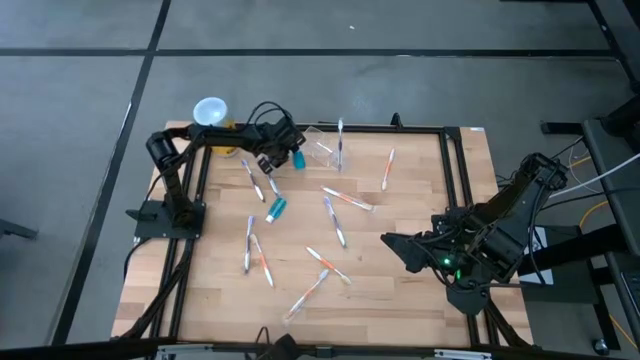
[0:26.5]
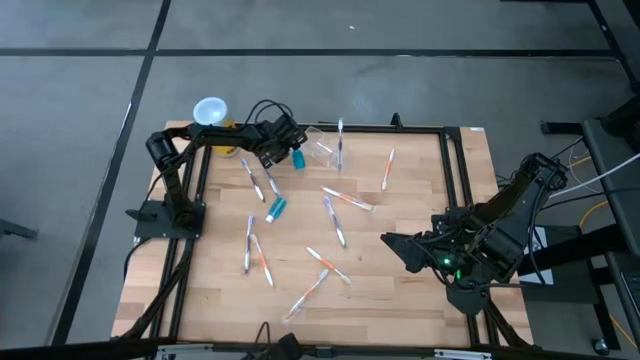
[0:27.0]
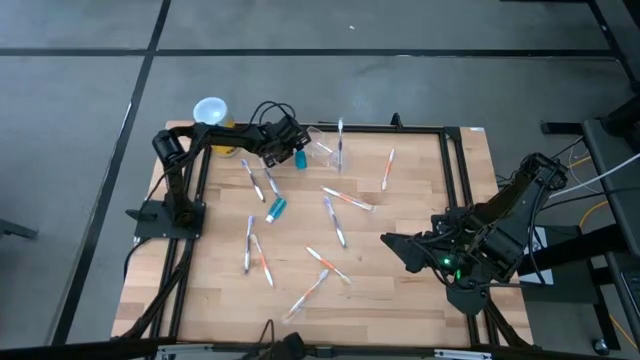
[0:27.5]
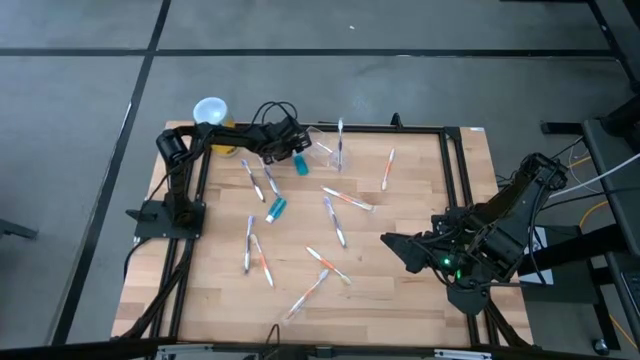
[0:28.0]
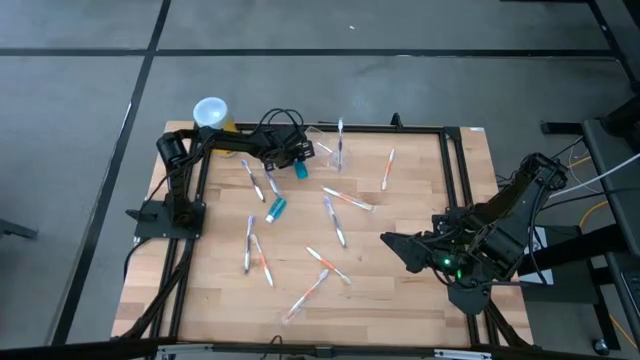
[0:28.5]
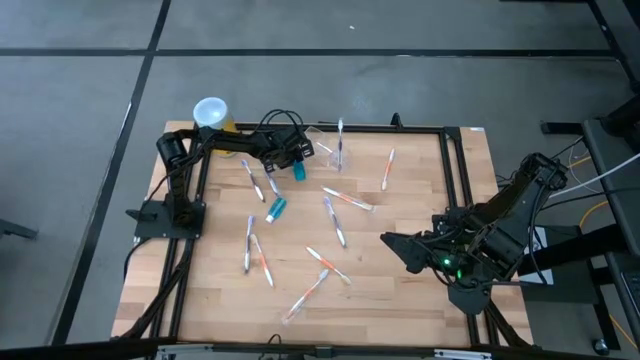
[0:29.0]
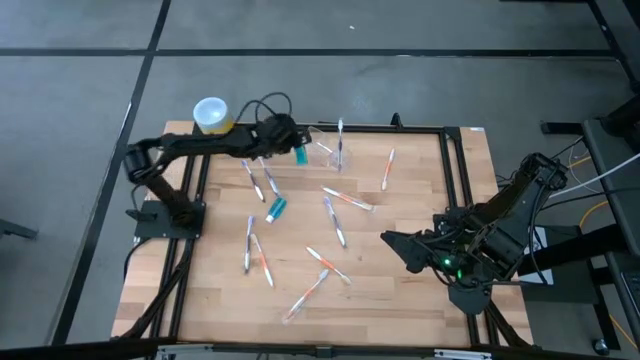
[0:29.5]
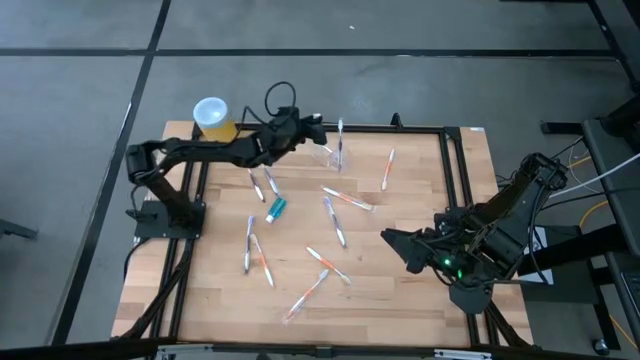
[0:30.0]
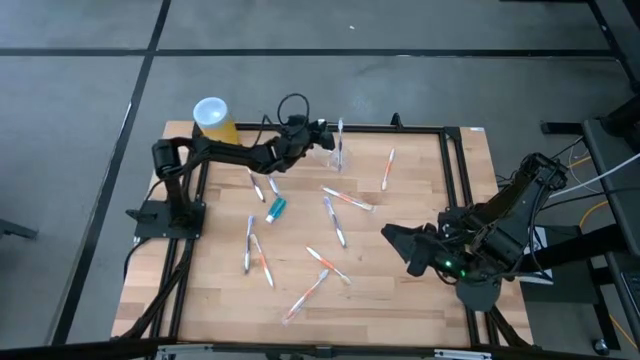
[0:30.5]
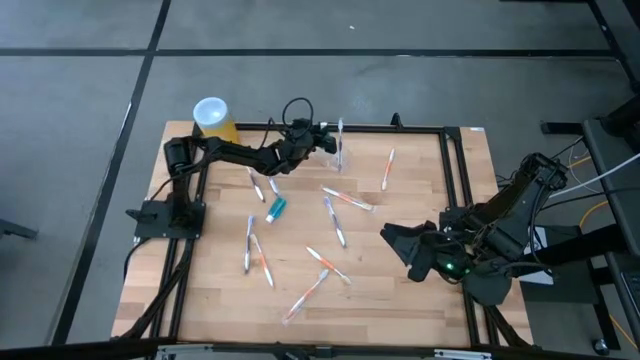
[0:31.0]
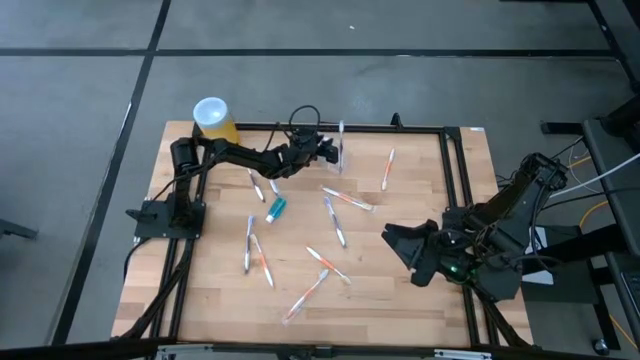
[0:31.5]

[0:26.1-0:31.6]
Task: Pick & Place toothbrushing station
Put the blue mouthwash into the middle section of the transparent organizer

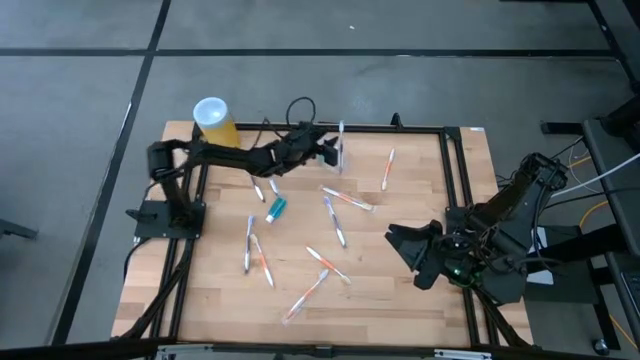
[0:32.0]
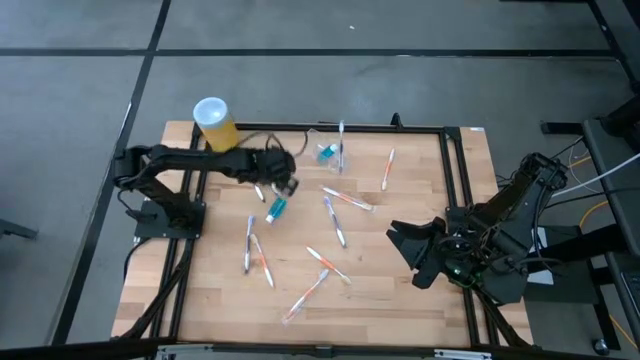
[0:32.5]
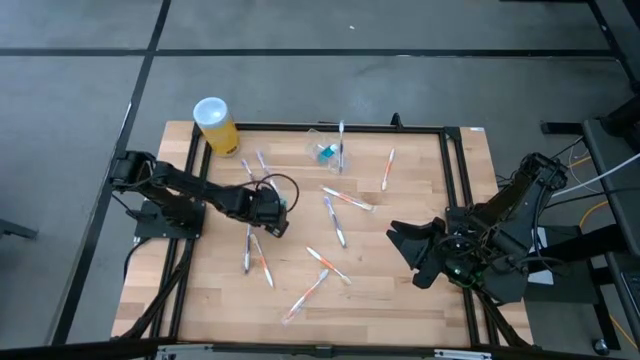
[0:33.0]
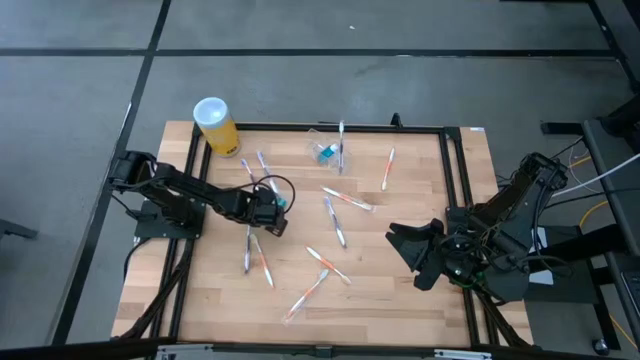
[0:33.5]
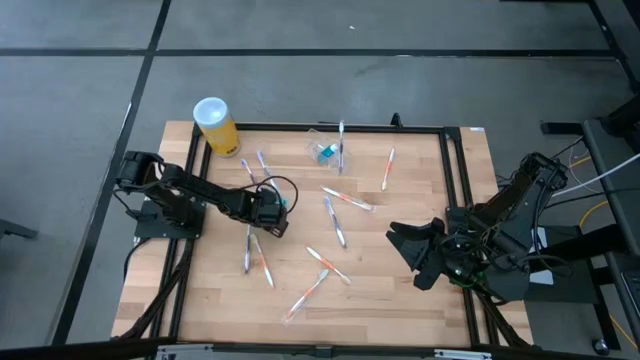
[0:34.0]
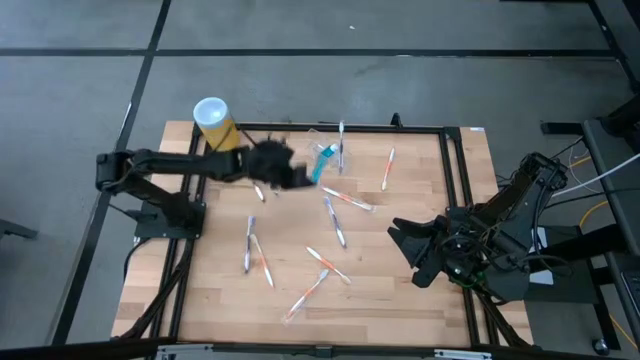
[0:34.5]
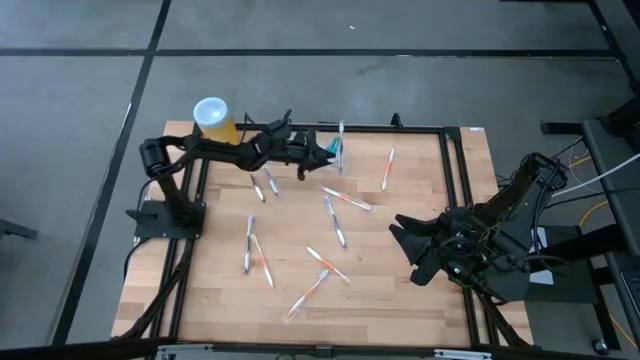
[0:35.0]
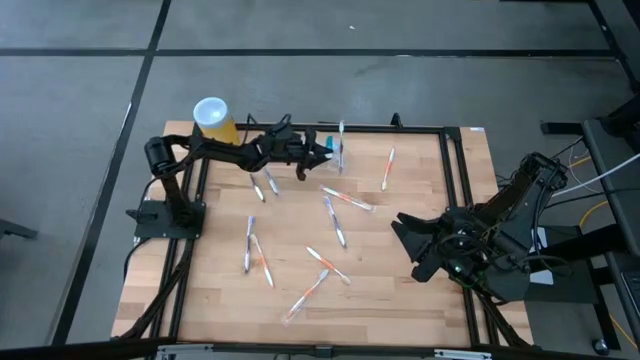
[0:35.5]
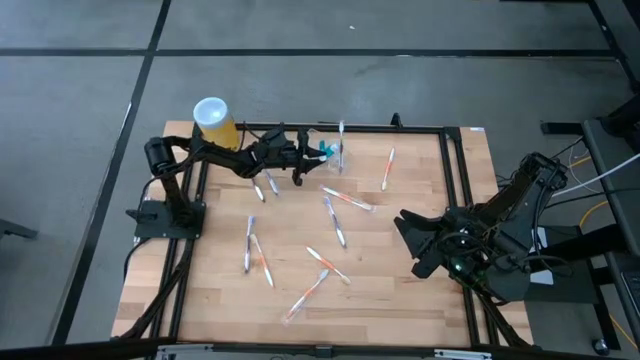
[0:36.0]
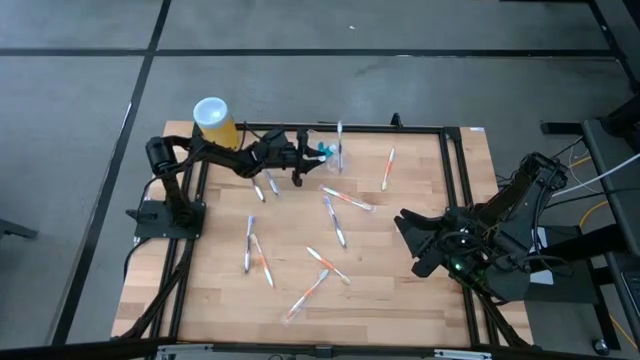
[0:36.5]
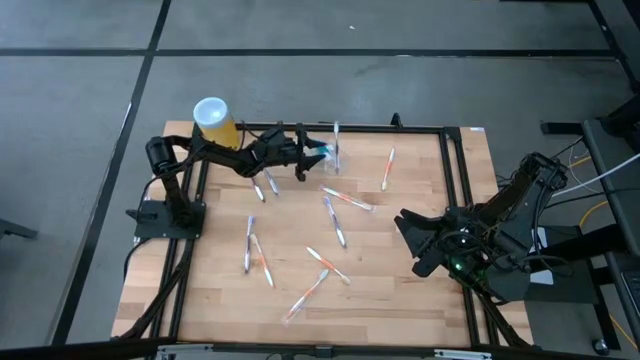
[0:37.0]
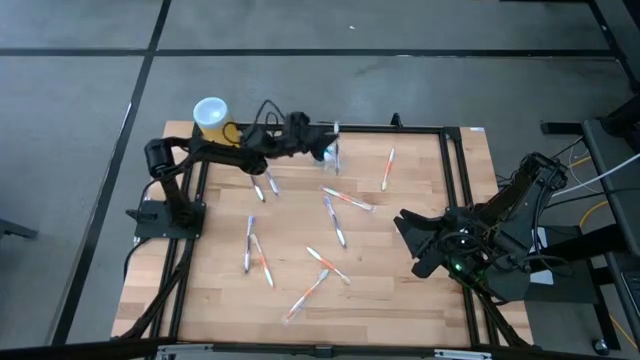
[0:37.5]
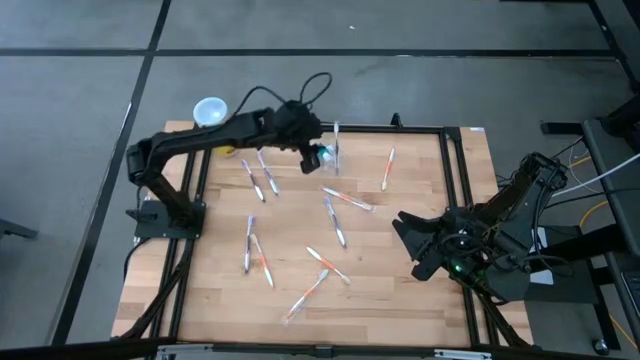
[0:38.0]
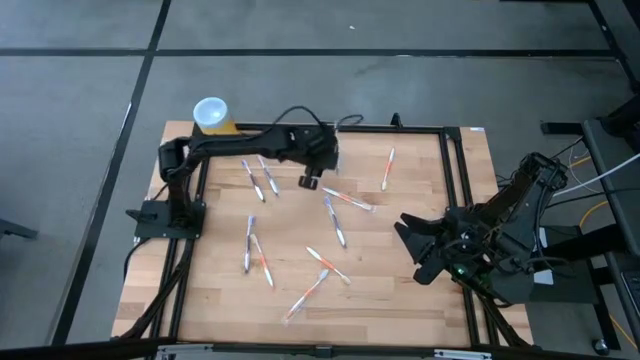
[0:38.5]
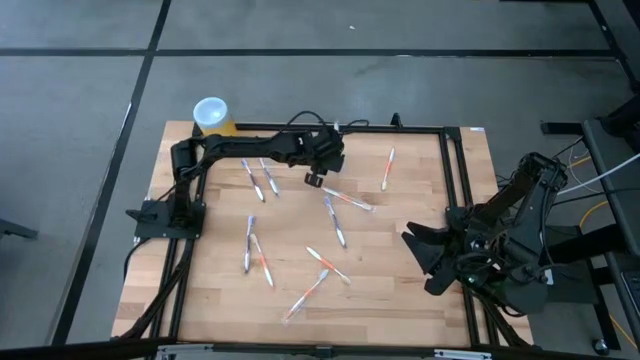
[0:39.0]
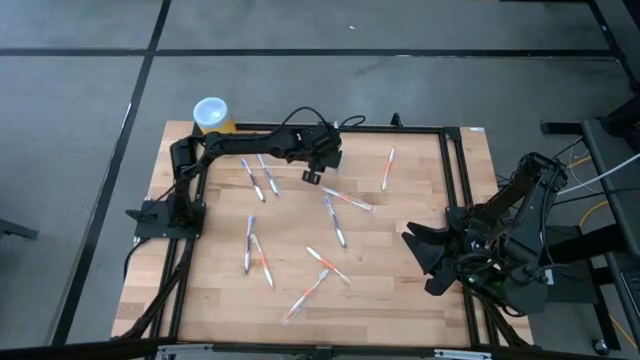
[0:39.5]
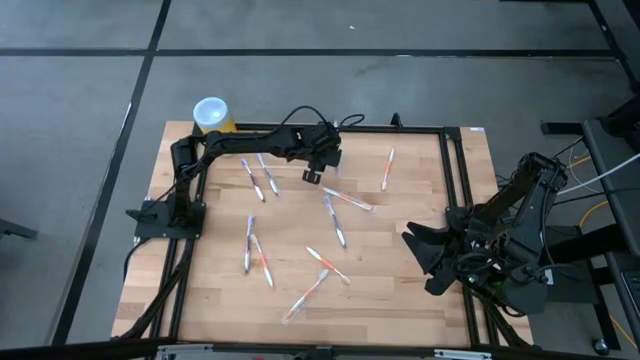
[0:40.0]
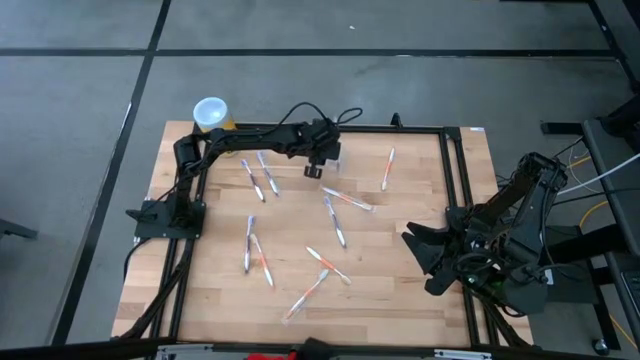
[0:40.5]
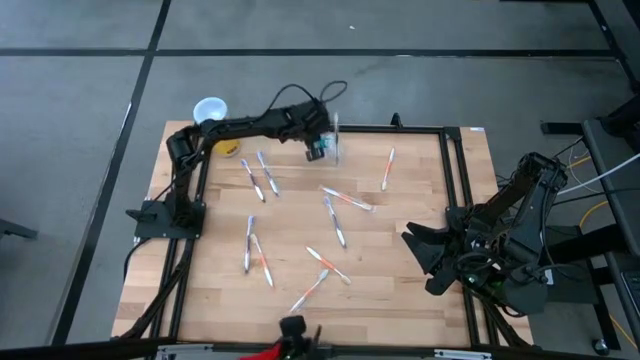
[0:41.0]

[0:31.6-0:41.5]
Put the blue mouthwash into the middle section of the transparent organizer

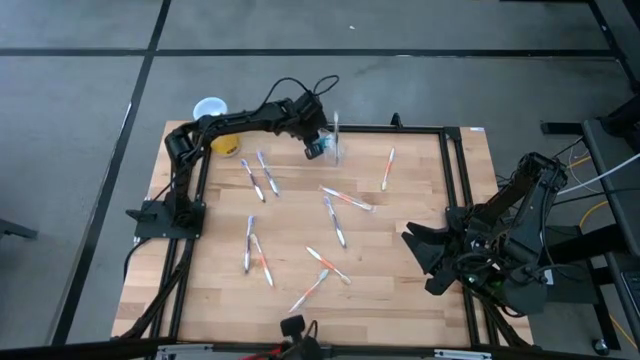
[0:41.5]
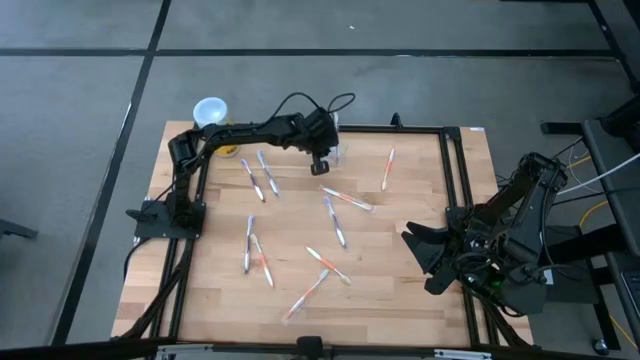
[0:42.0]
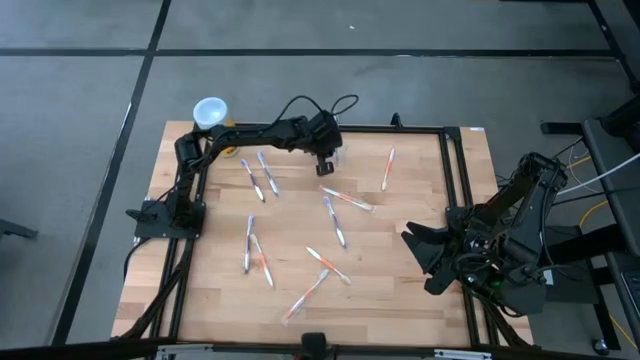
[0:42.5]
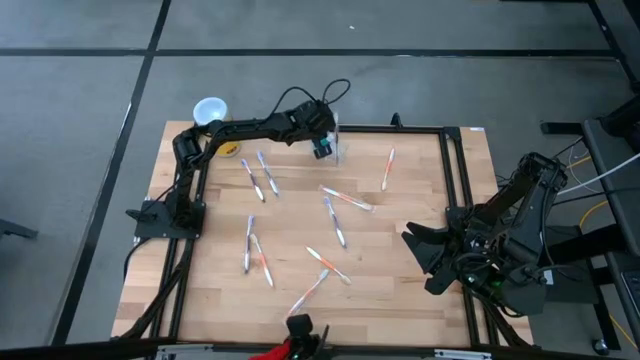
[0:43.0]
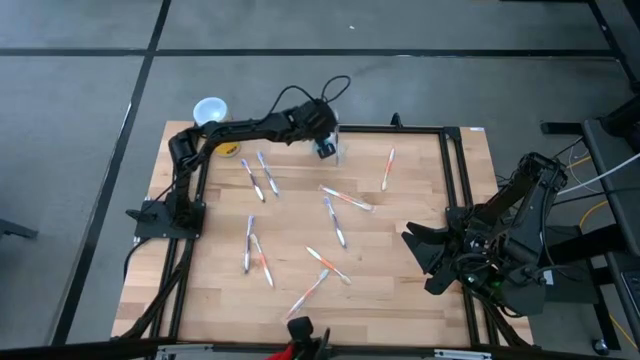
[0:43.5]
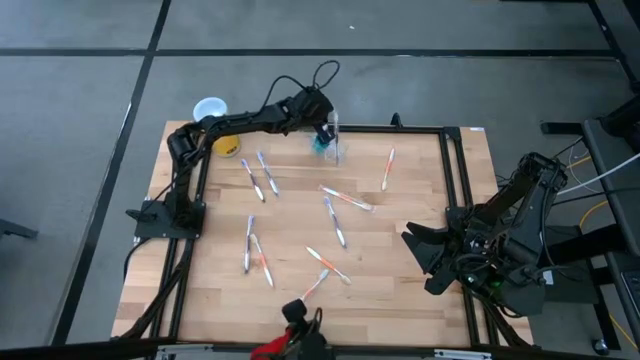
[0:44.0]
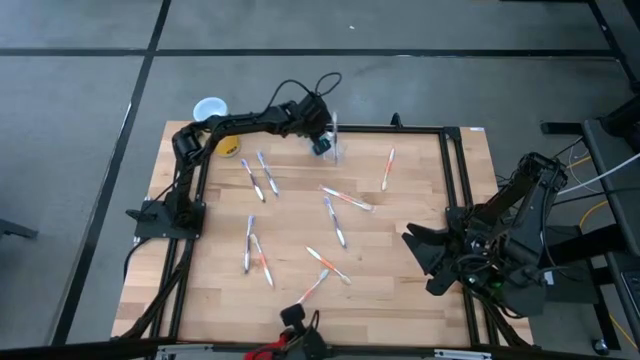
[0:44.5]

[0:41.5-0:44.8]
Put the blue mouthwash into the middle section of the transparent organizer

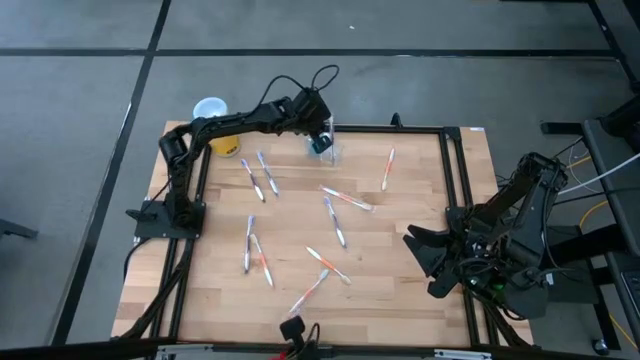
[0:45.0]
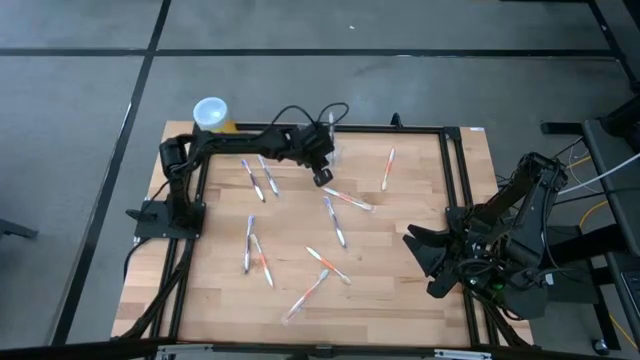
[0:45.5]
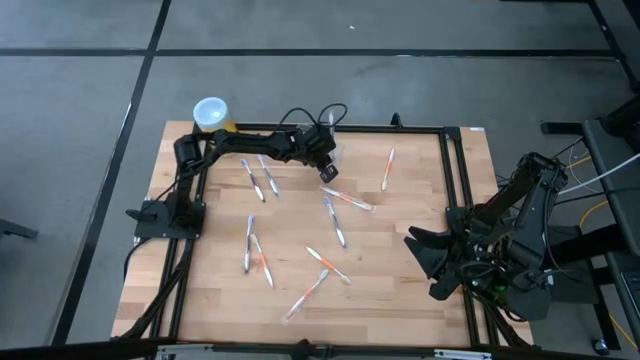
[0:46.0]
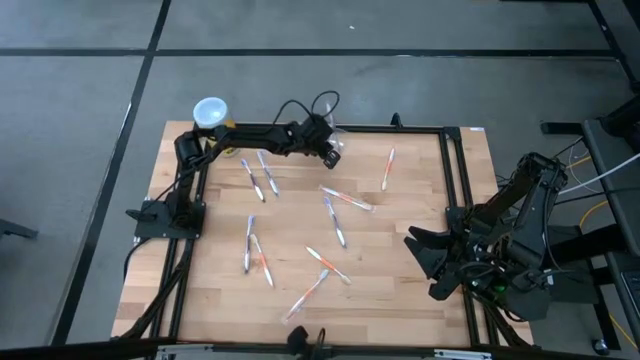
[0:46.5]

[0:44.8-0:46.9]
Adjust the transparent organizer on the table

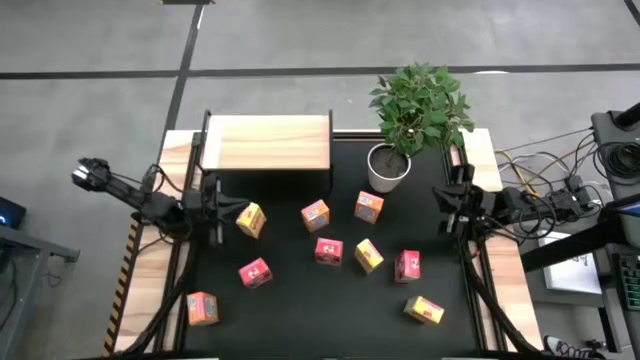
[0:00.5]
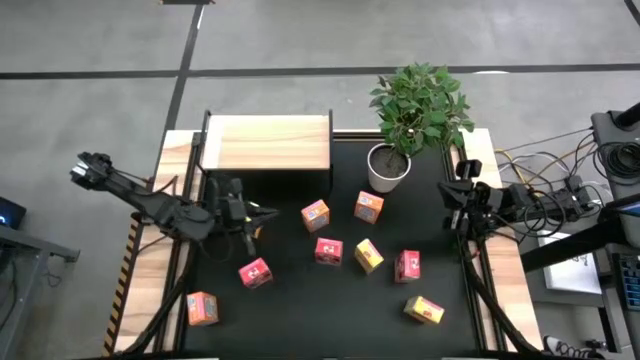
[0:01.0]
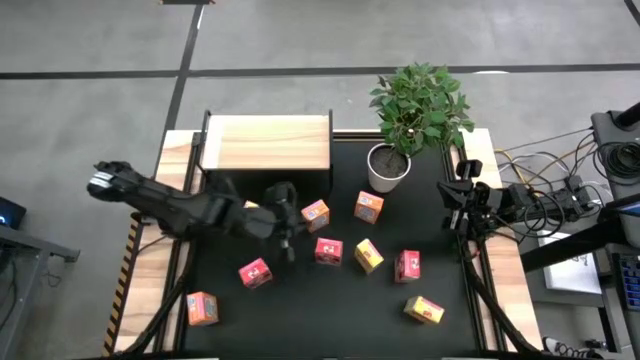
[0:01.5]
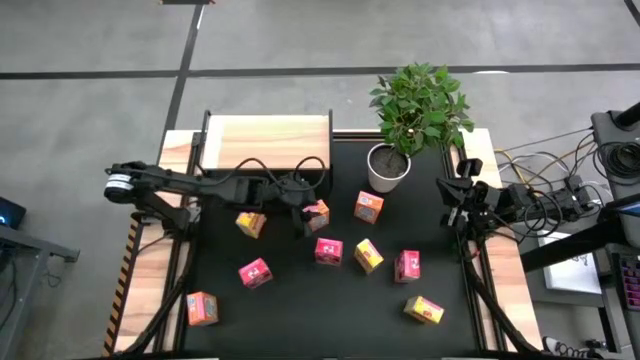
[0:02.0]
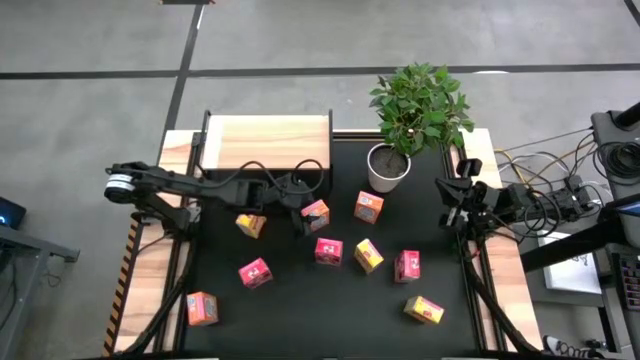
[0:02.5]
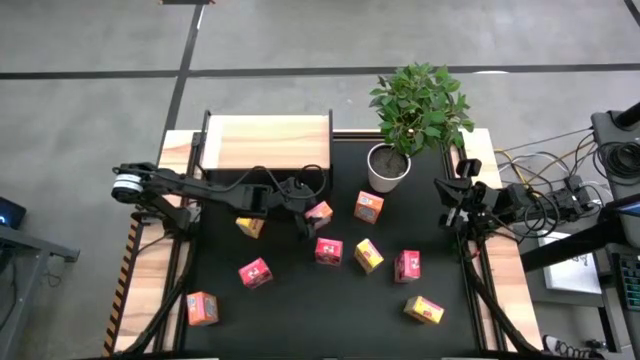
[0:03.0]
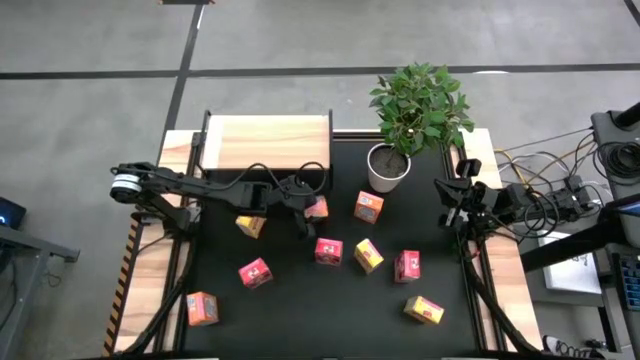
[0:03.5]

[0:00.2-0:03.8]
Task: Stack cereal on shelf
Put the top center orange cereal box on the shelf
